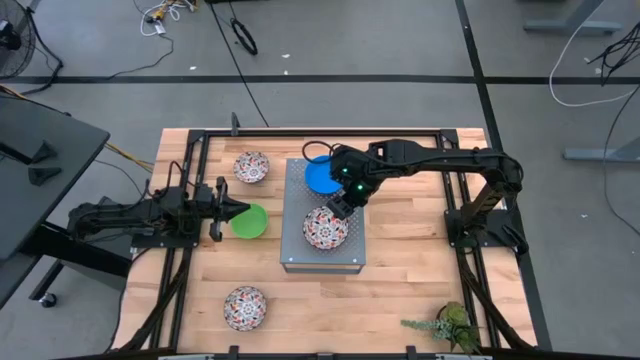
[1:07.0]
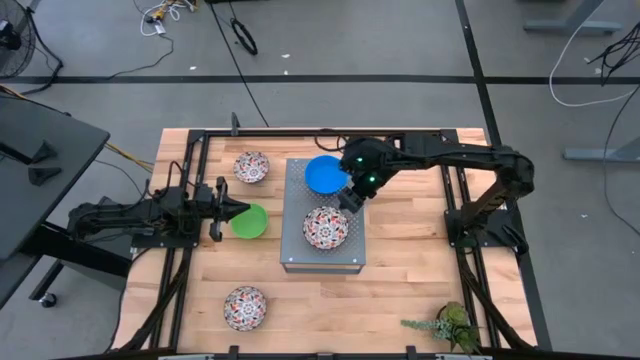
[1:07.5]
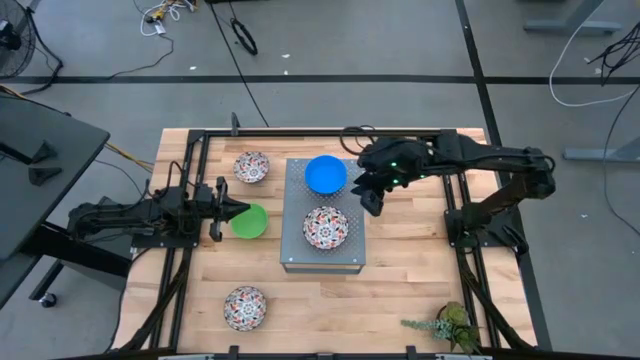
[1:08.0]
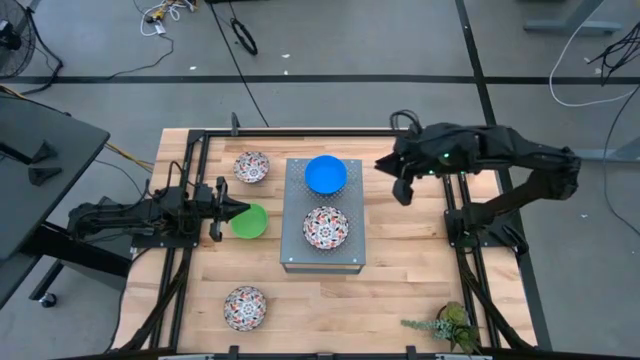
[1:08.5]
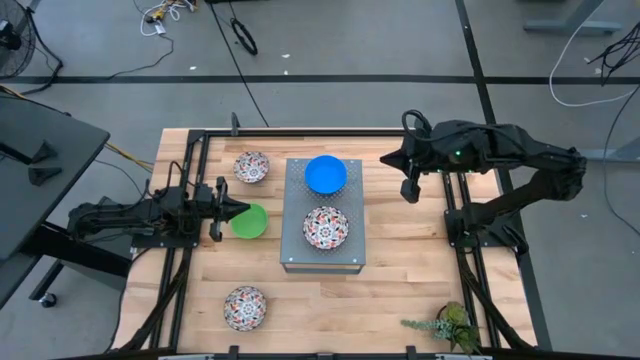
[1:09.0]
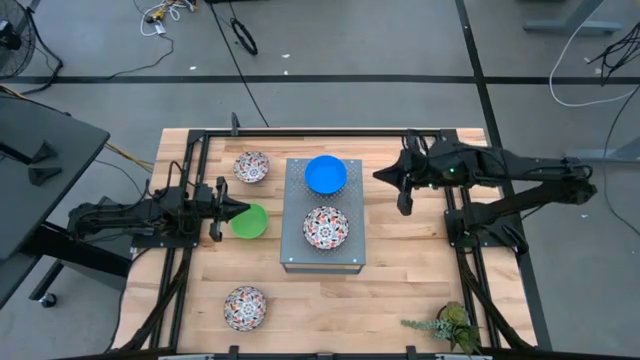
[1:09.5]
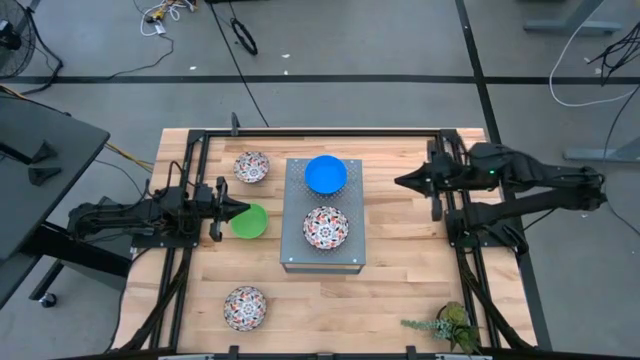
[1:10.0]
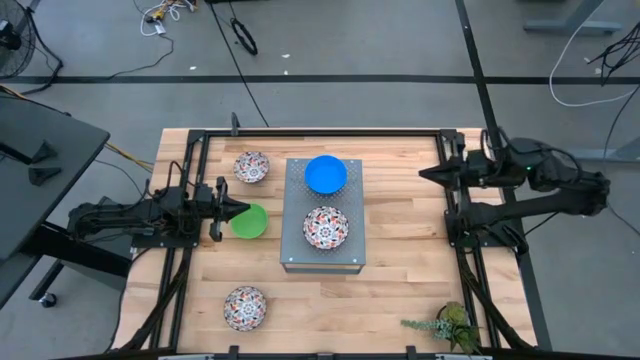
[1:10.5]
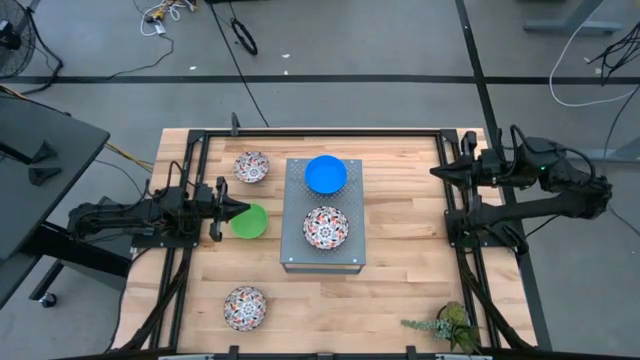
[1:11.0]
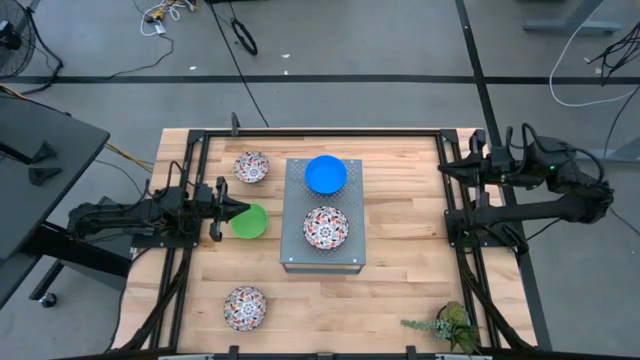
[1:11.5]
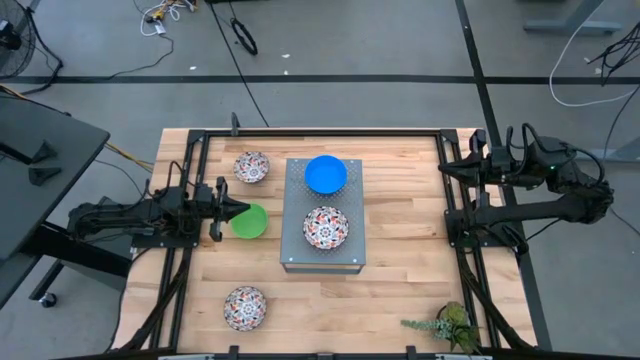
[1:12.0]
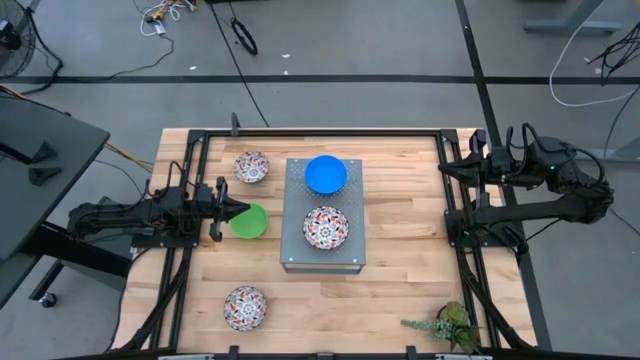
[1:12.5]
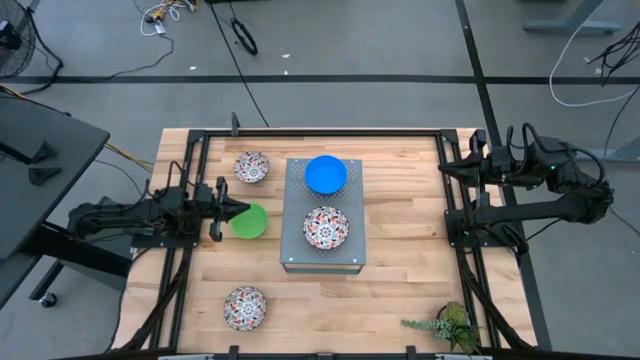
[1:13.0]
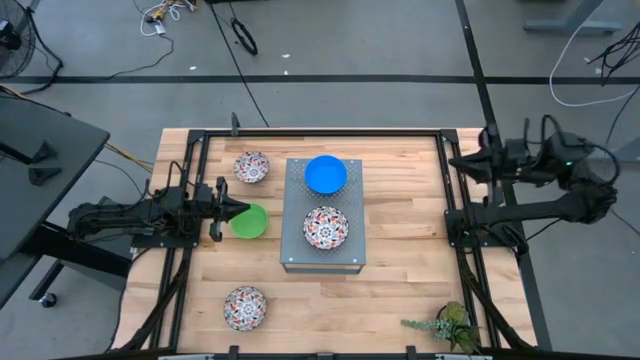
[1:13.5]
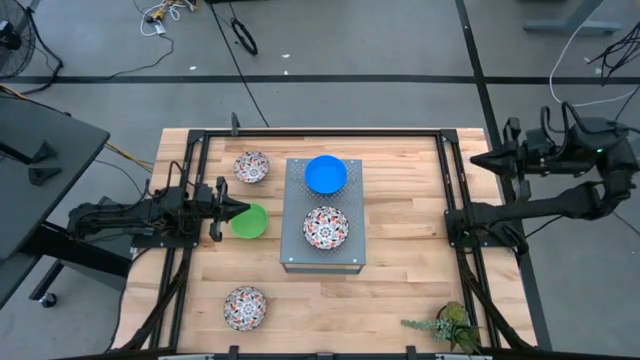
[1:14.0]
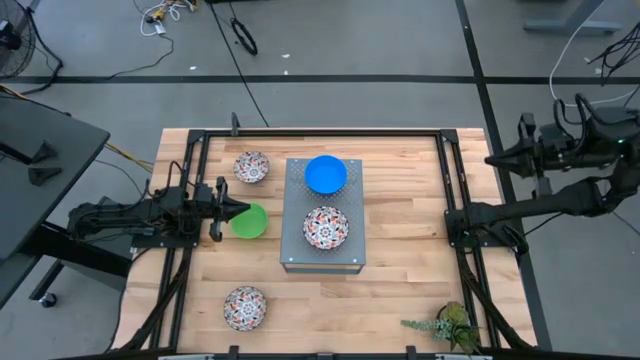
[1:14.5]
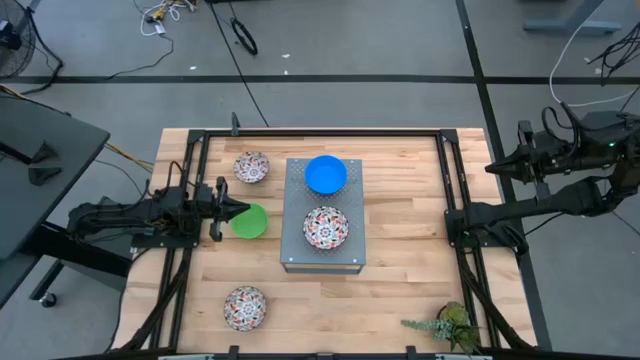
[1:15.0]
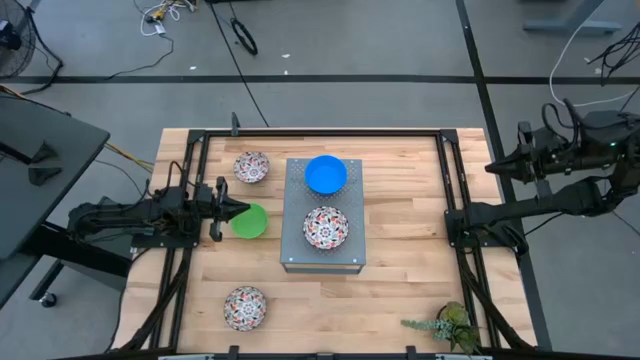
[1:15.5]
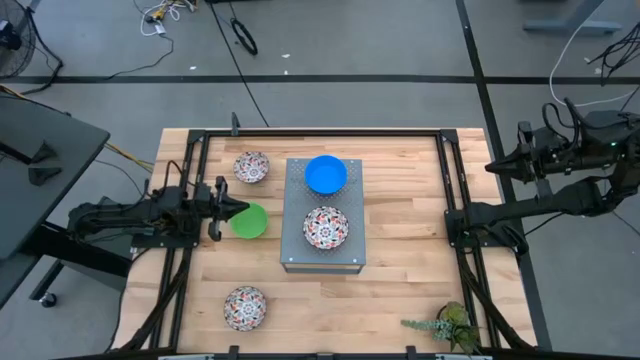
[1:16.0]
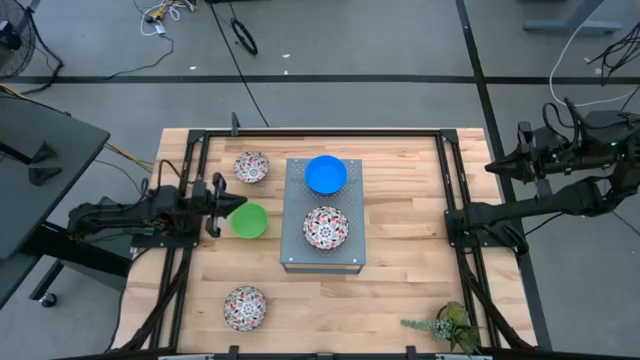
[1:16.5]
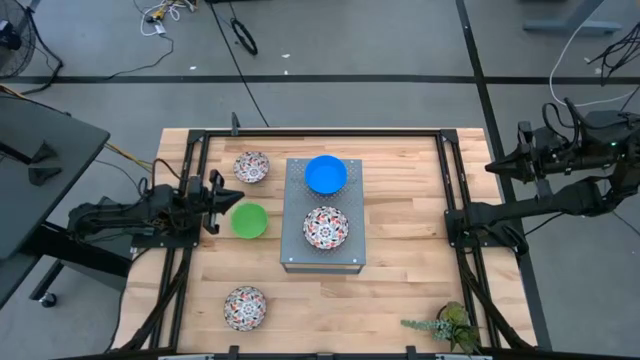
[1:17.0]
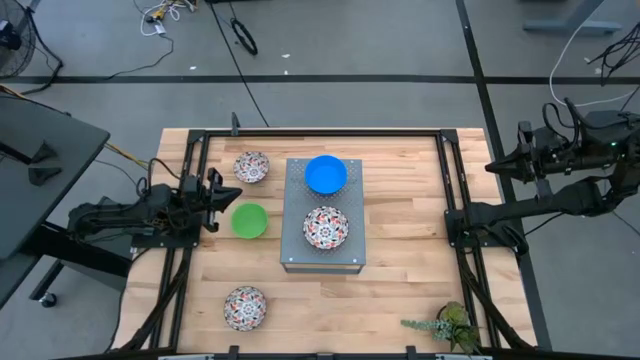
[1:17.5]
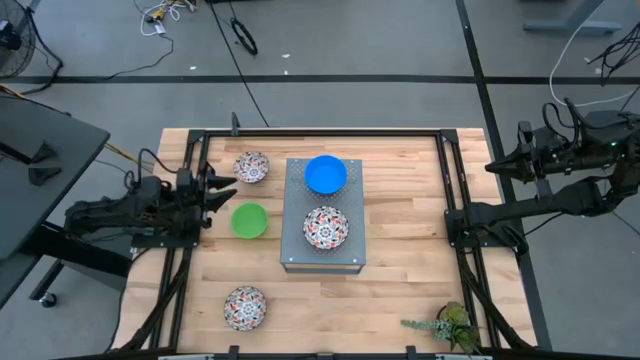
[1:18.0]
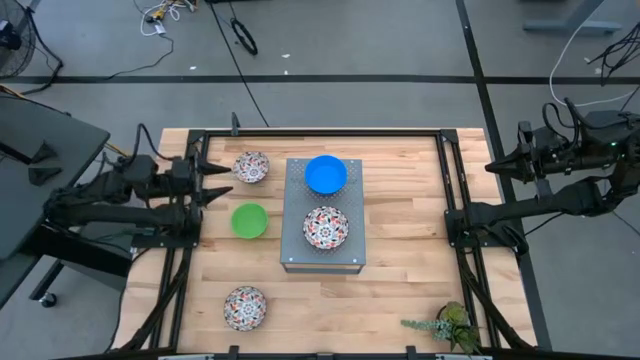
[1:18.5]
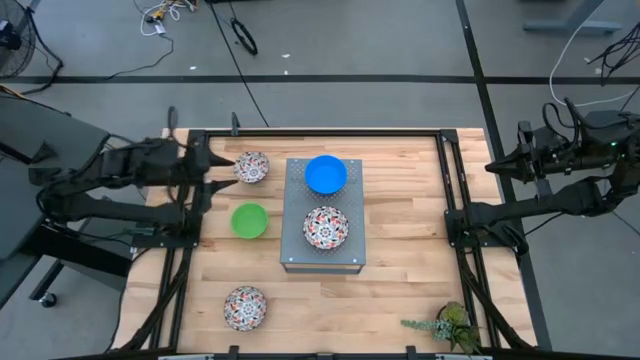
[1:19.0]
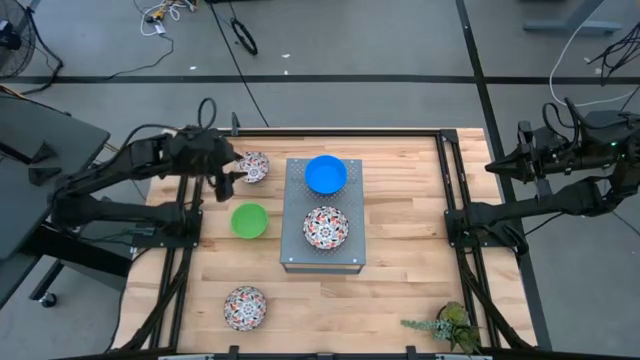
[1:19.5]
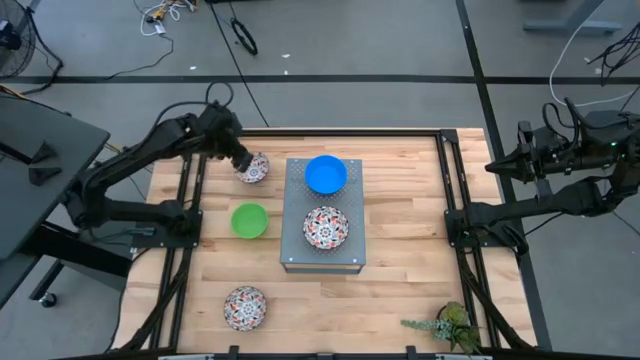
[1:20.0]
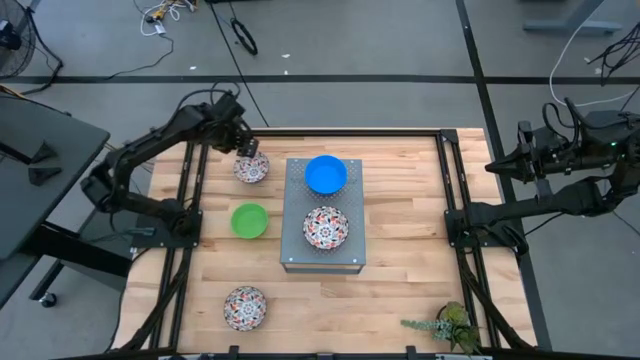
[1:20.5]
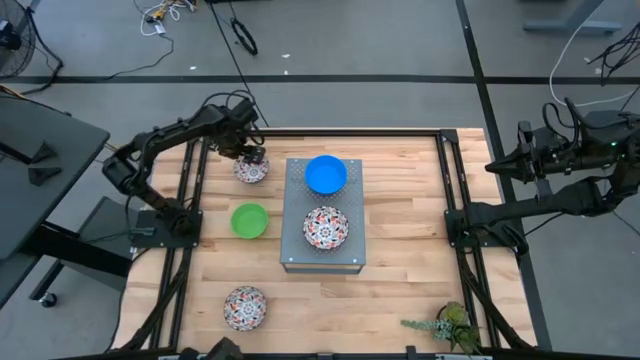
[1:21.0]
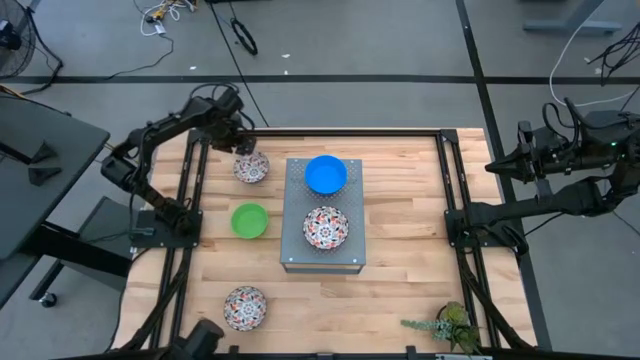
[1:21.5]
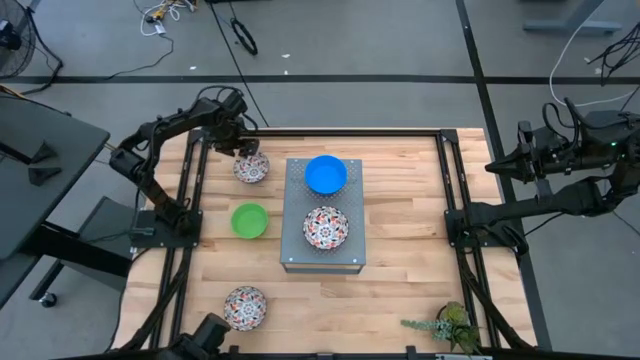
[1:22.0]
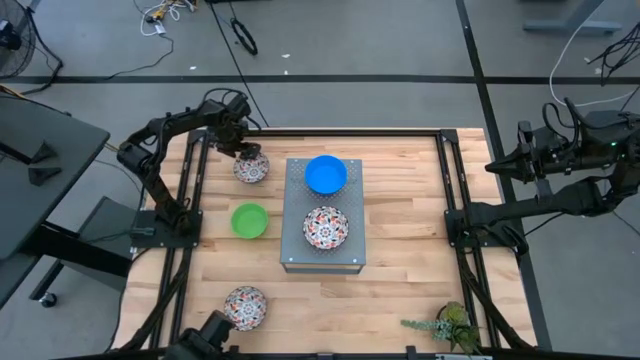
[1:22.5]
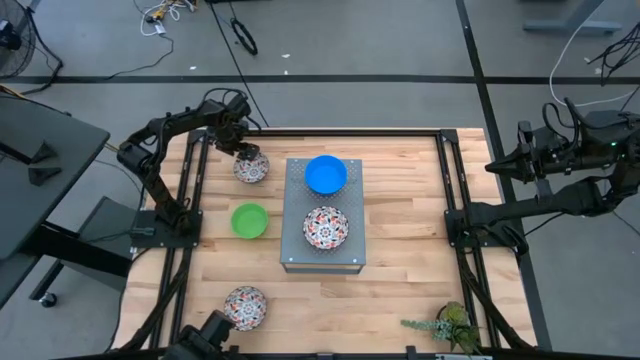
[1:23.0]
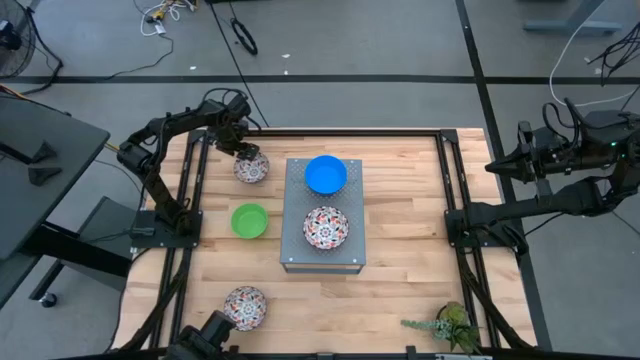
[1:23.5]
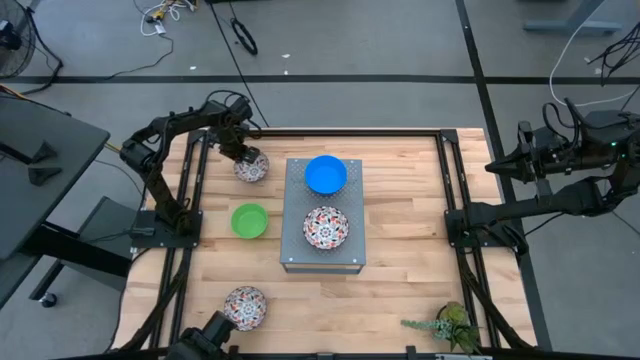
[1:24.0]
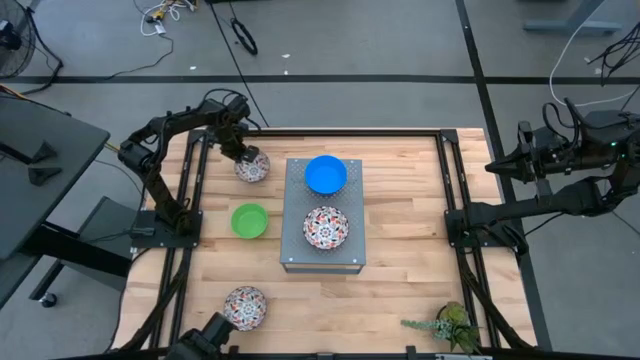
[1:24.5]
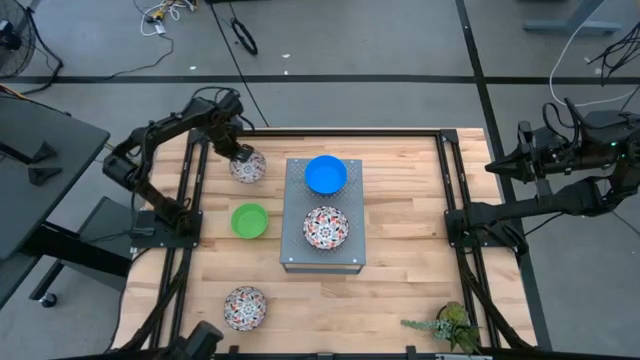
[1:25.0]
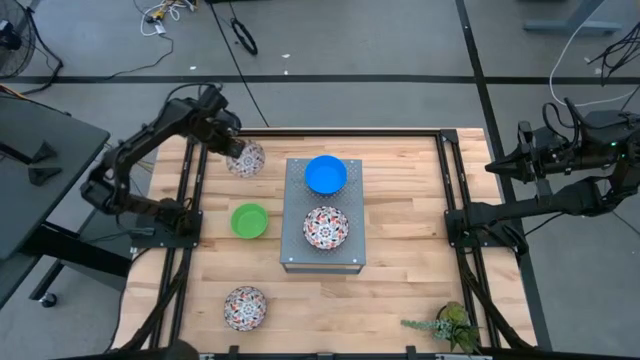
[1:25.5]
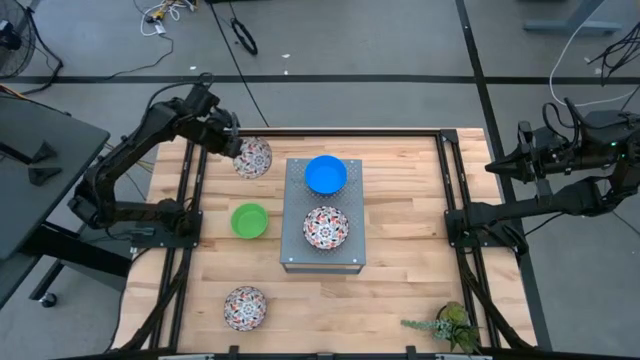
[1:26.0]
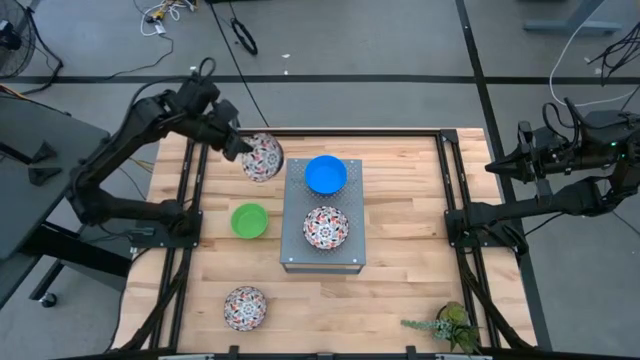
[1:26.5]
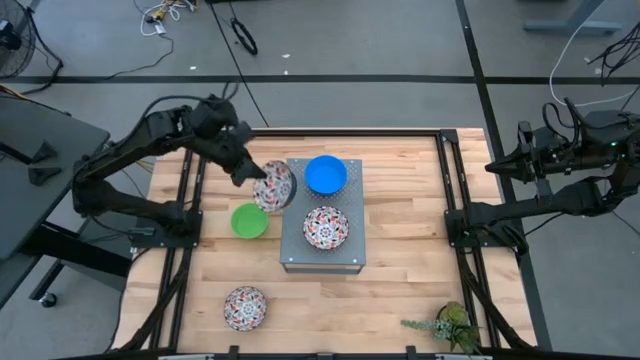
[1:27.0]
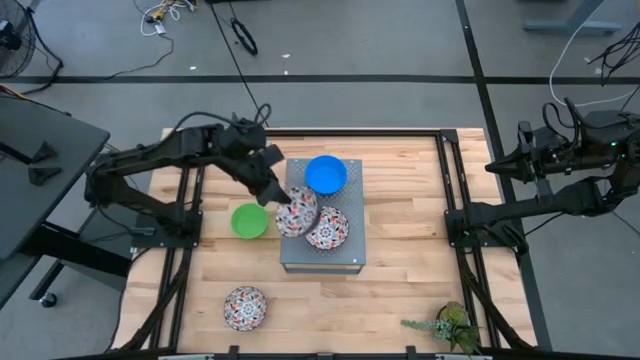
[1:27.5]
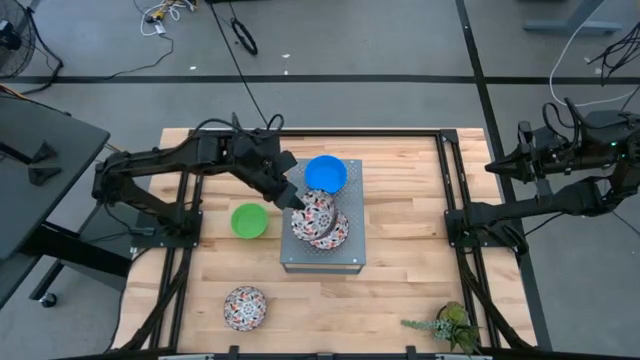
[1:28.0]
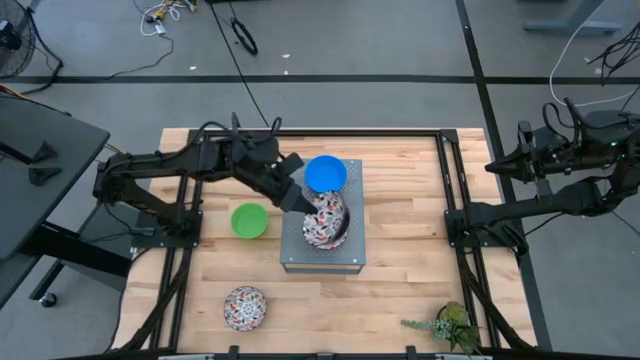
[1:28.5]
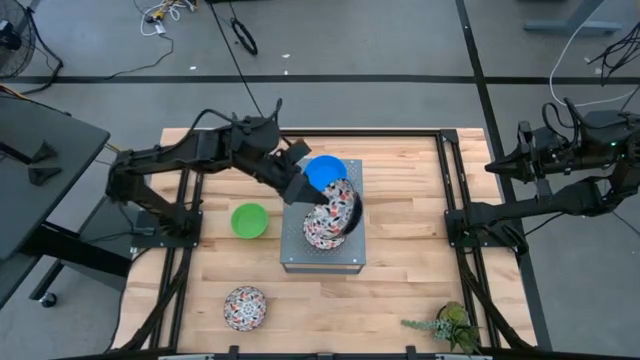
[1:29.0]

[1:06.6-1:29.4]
Task: Pick & Place Mini bowls
Stack the top white patterned bowl on top of the white patterned bowl on the shelf
